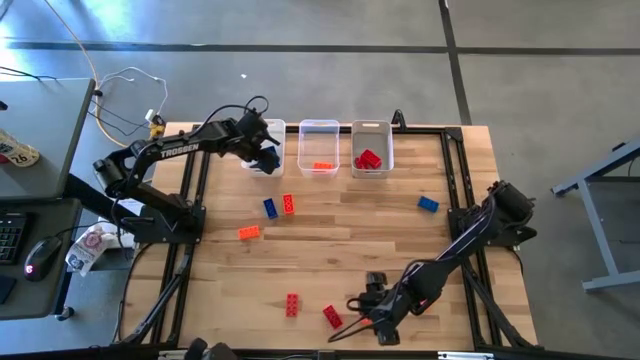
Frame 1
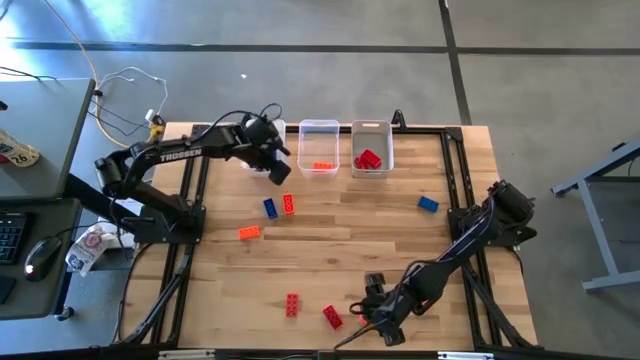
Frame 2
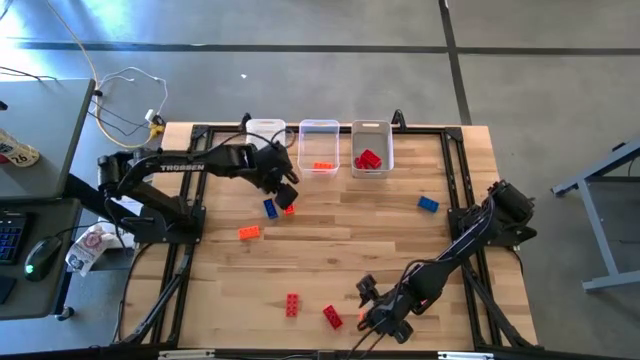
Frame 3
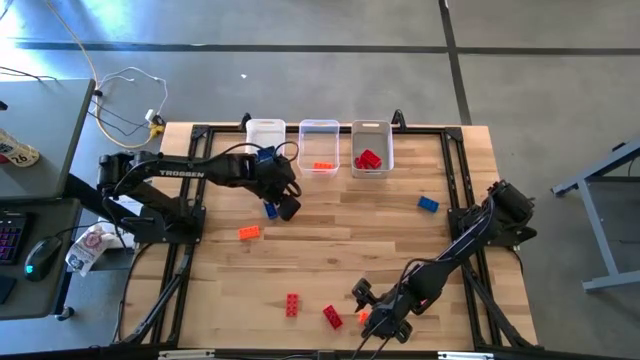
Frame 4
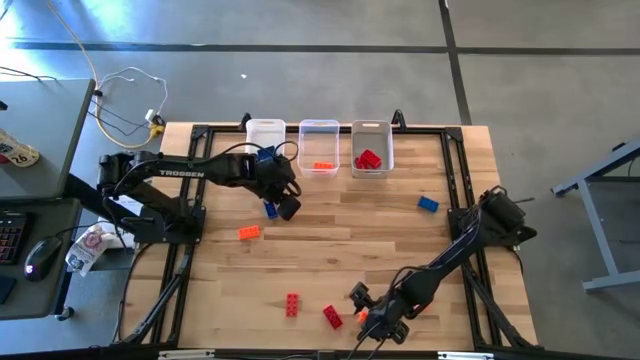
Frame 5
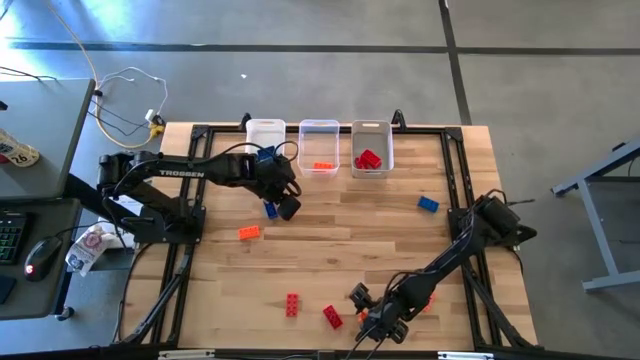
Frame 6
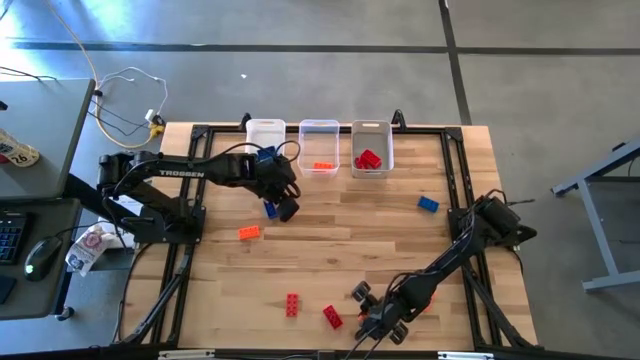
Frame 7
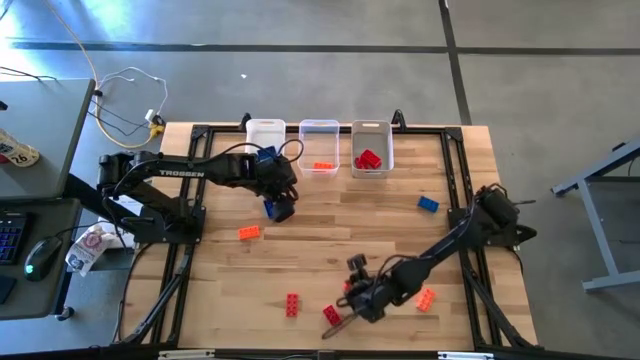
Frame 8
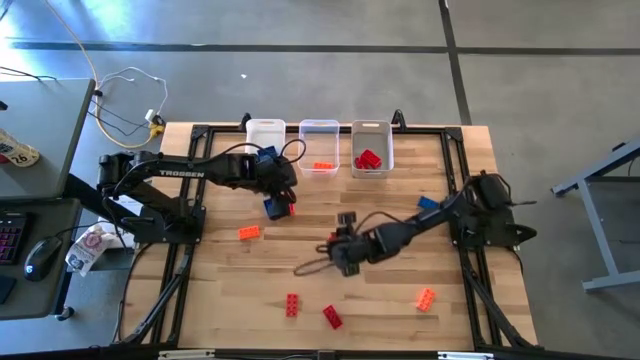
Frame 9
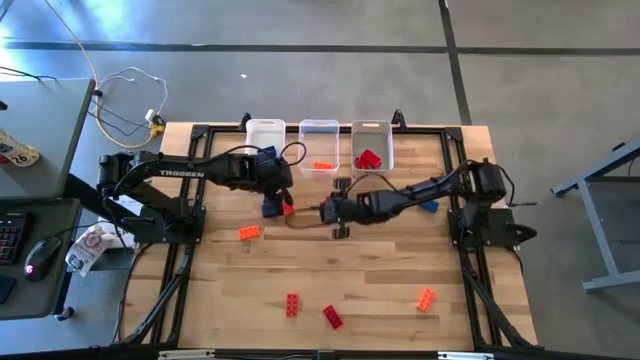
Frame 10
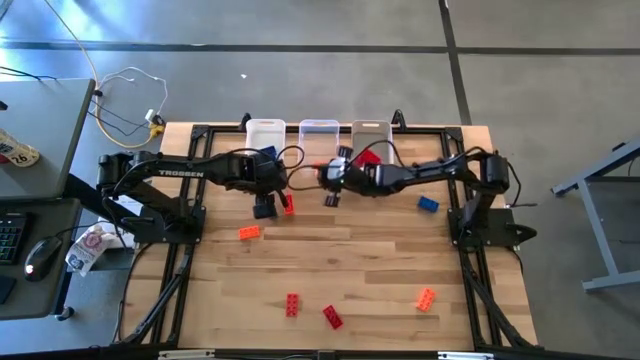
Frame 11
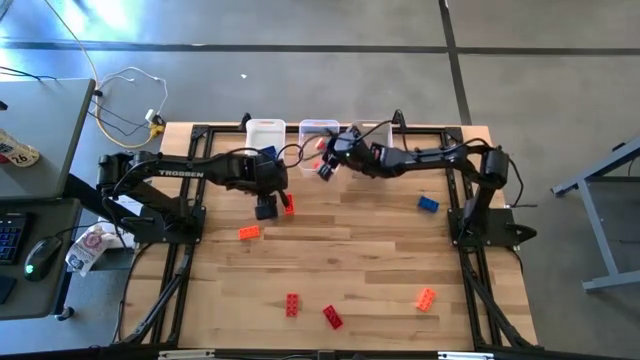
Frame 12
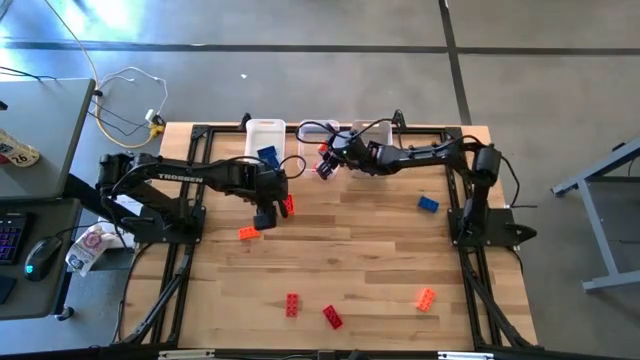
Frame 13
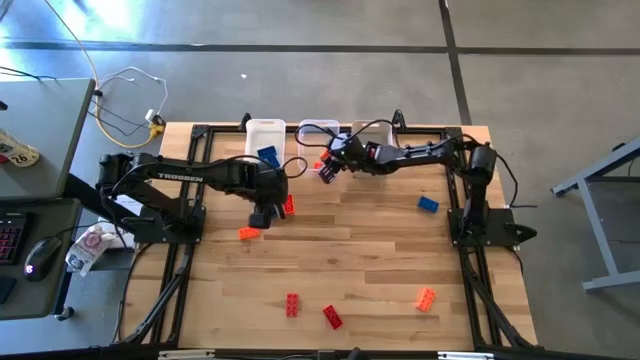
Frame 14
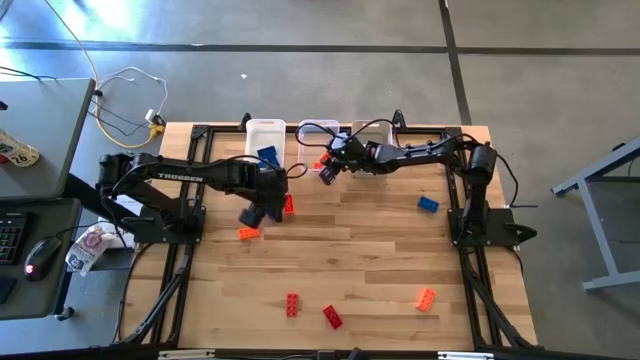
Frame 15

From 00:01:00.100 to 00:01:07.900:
Task: Sort & place blocks by color
Put the orange game piece into the transparent bin

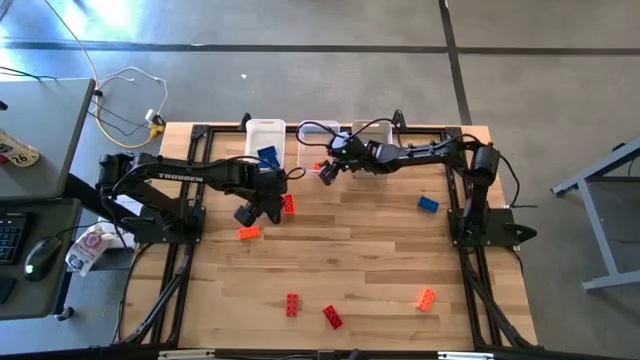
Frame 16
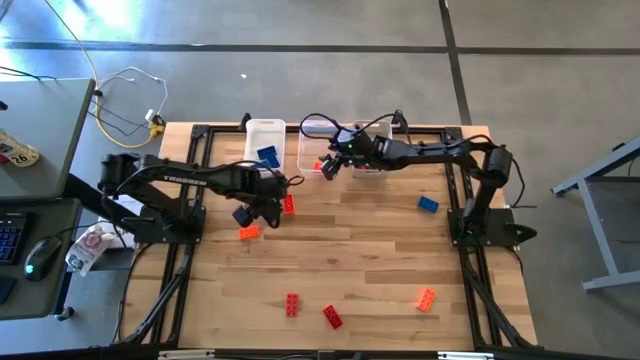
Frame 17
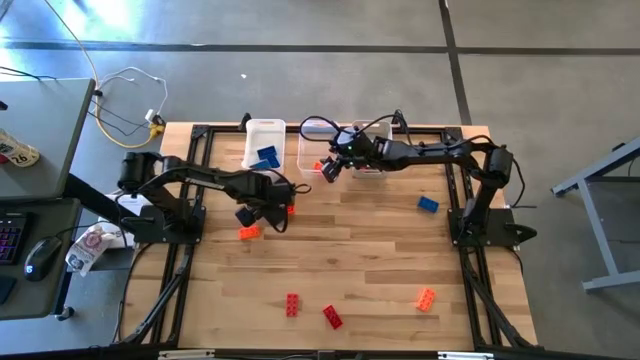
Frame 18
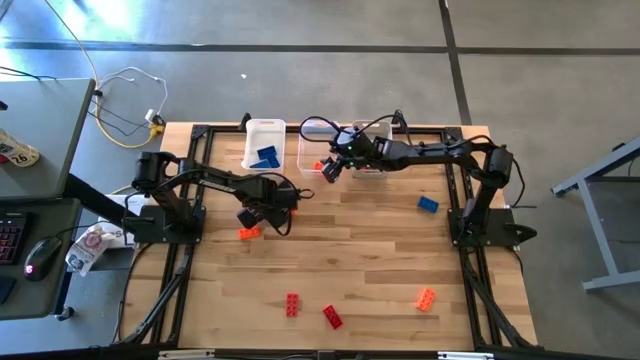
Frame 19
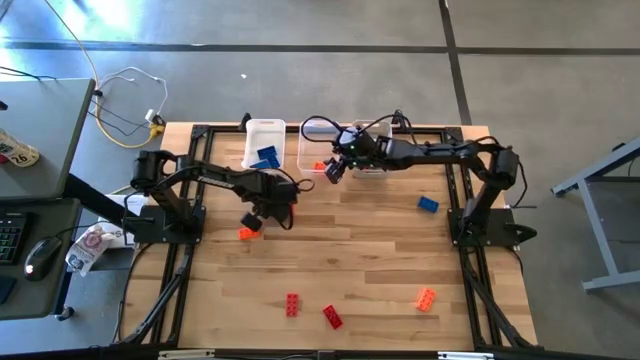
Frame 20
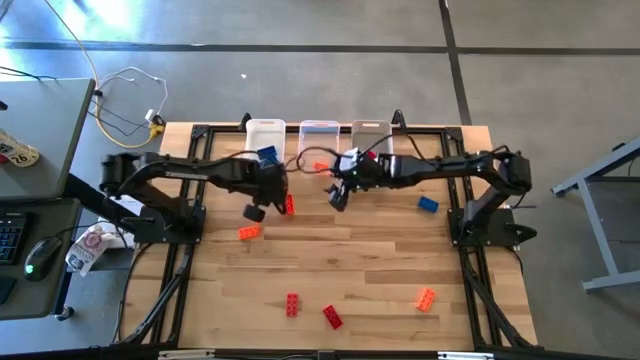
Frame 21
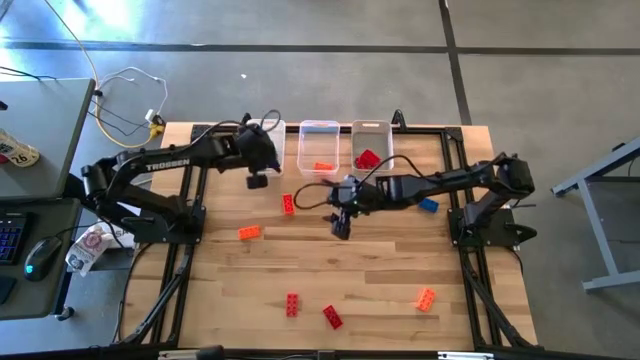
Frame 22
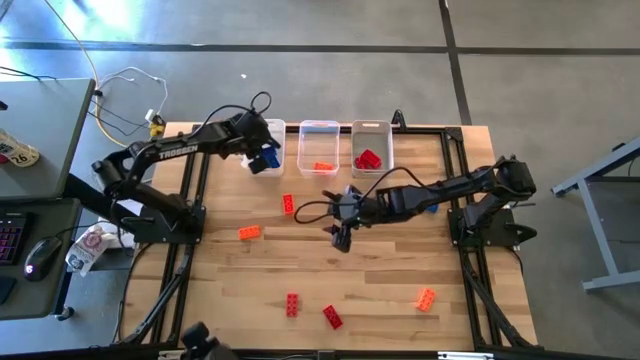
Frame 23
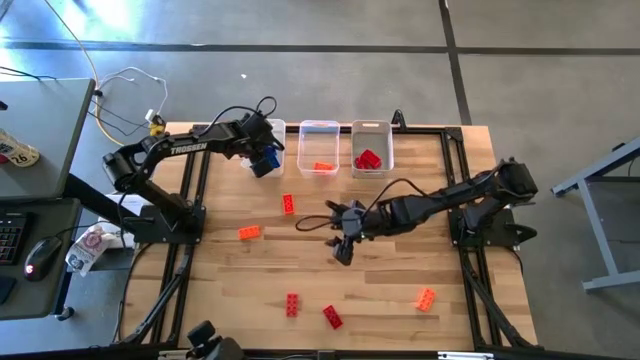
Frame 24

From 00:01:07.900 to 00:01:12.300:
Put the blue game piece into the white bin

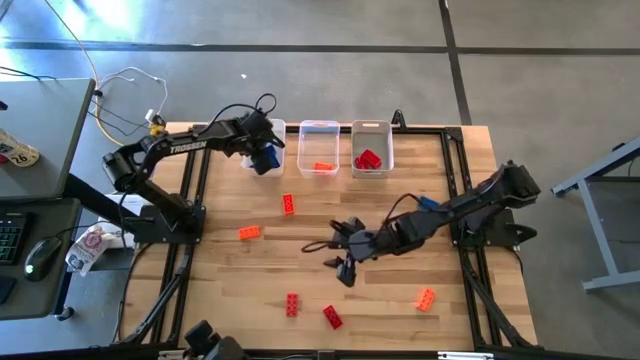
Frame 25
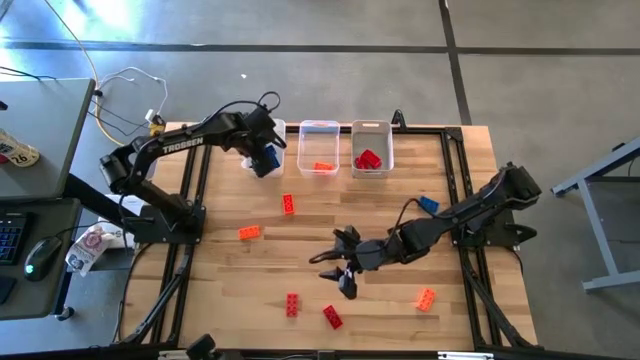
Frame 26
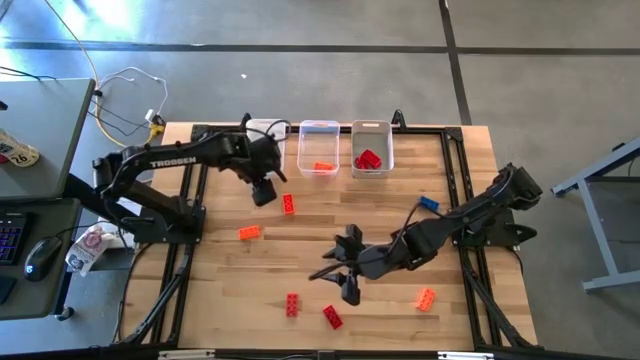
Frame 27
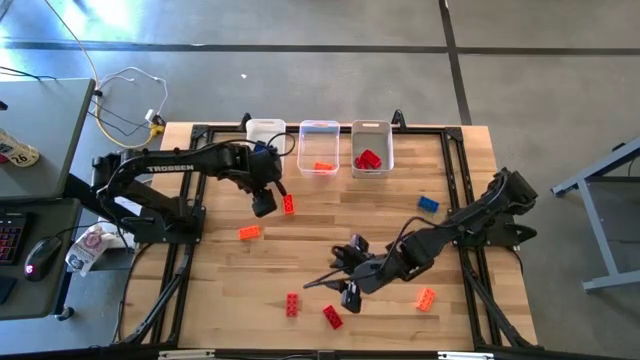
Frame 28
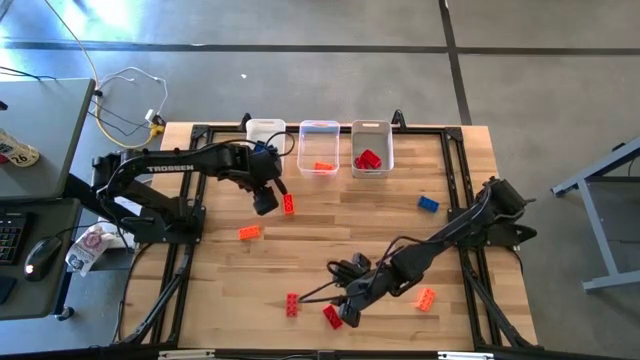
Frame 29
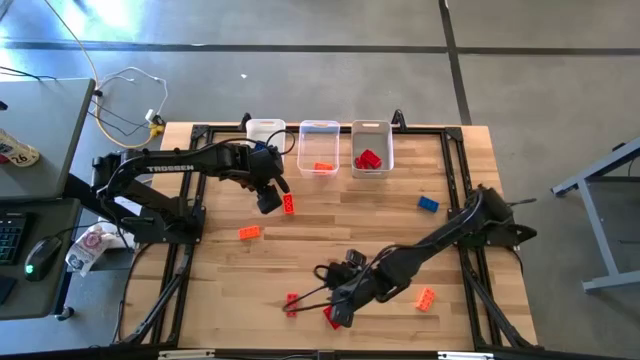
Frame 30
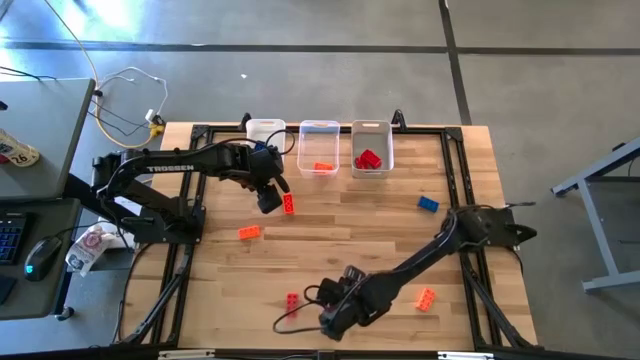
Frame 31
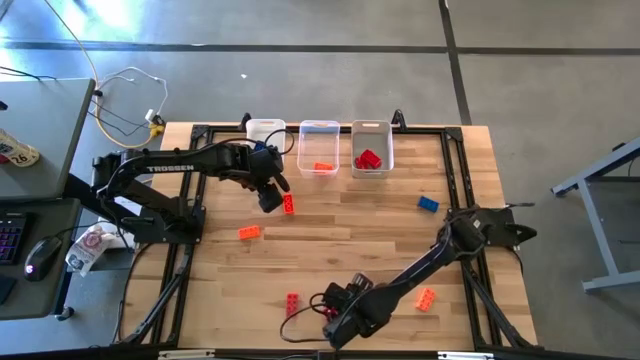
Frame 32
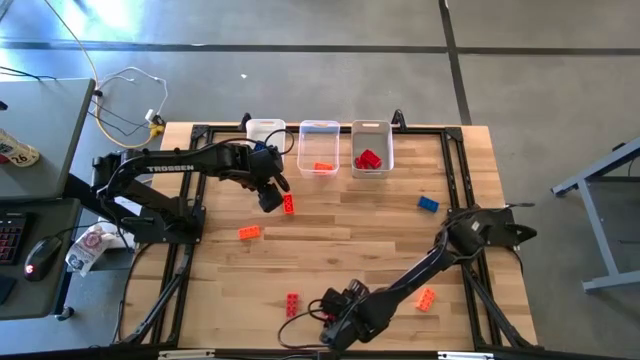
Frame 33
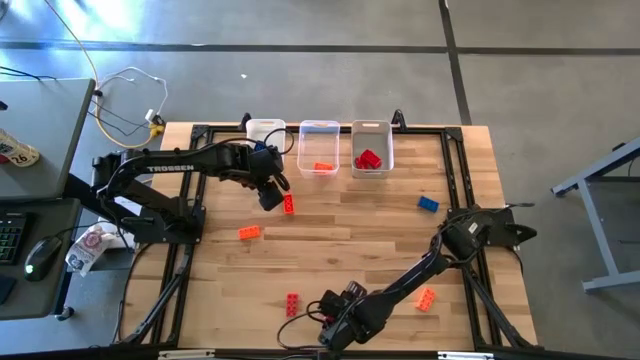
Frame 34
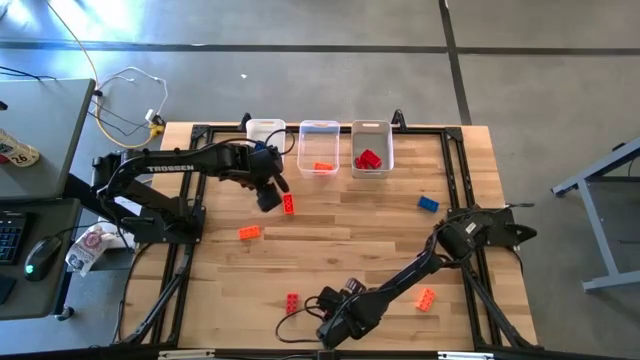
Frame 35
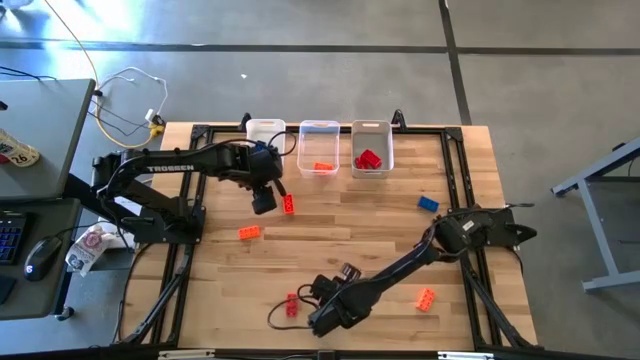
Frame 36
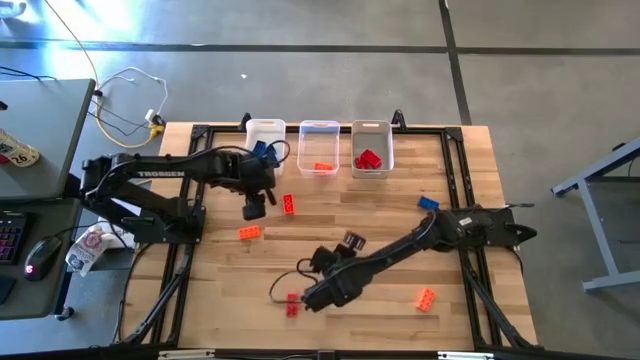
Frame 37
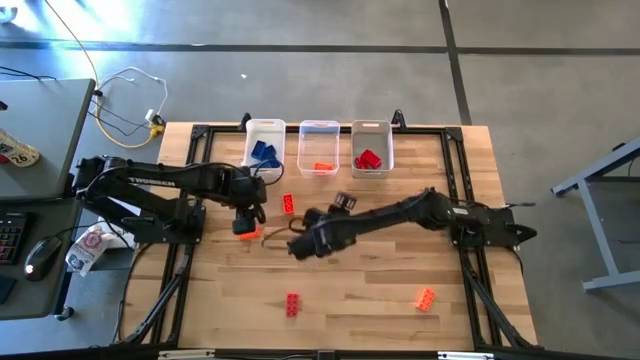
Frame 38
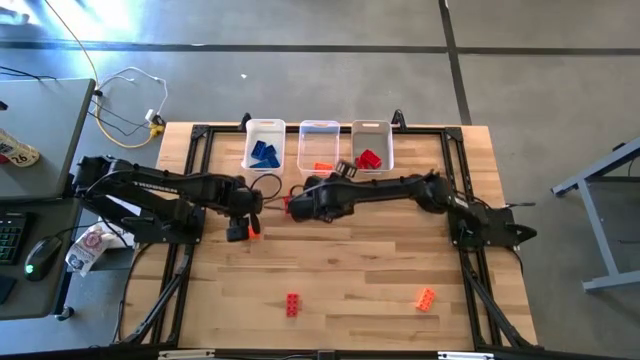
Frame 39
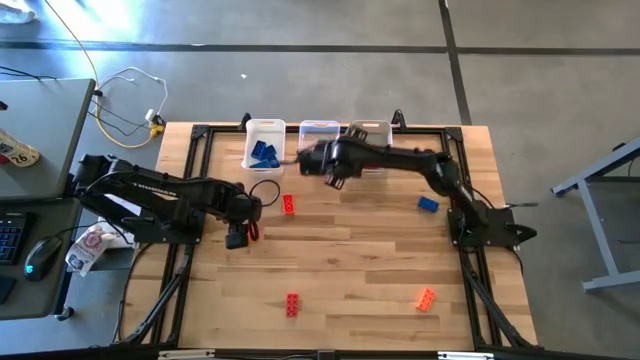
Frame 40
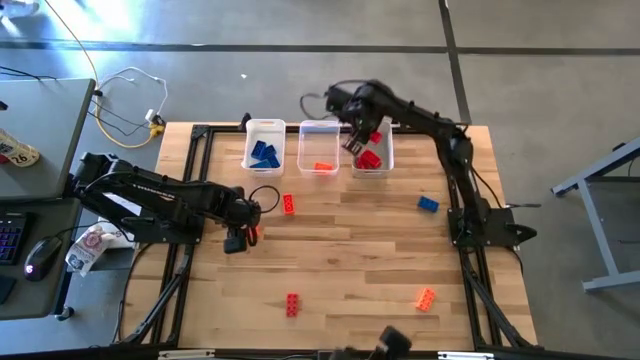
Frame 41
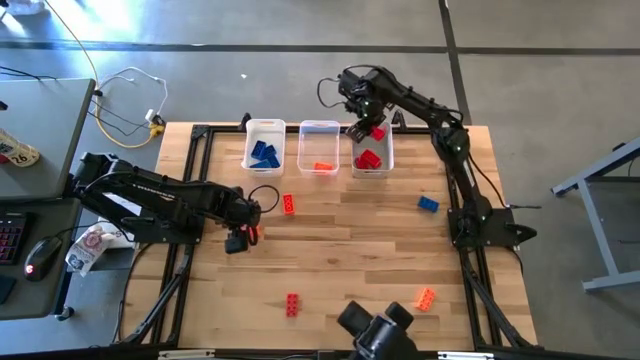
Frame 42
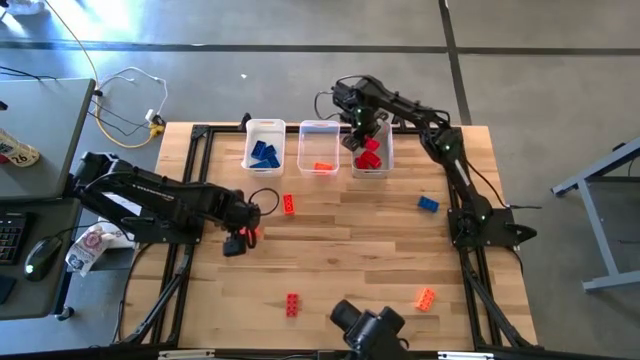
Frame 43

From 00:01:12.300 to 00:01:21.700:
Put the red game piece into the gray bin

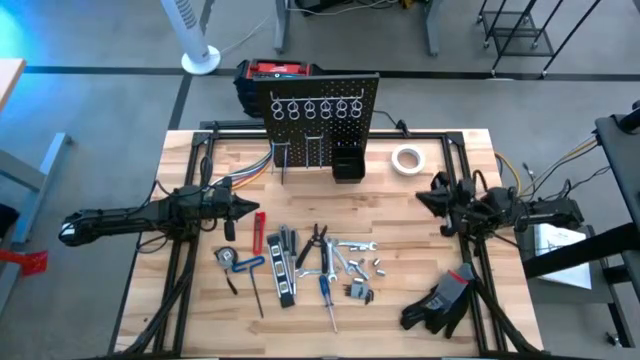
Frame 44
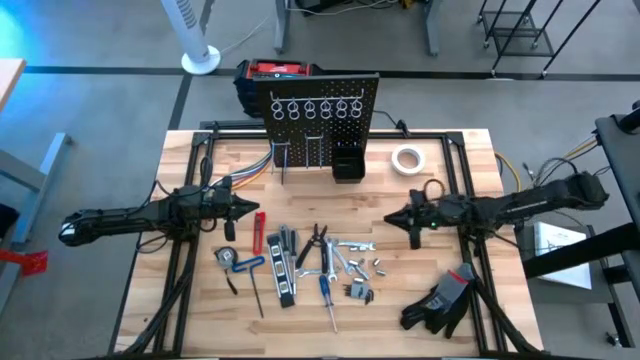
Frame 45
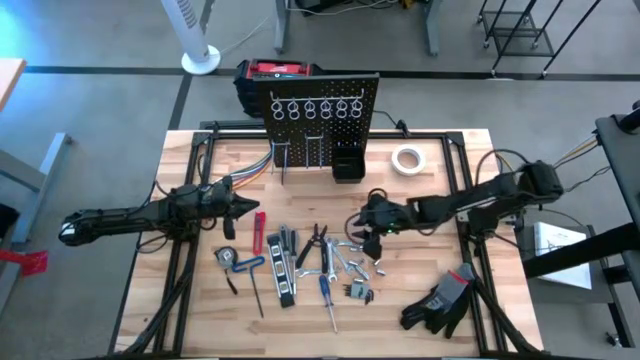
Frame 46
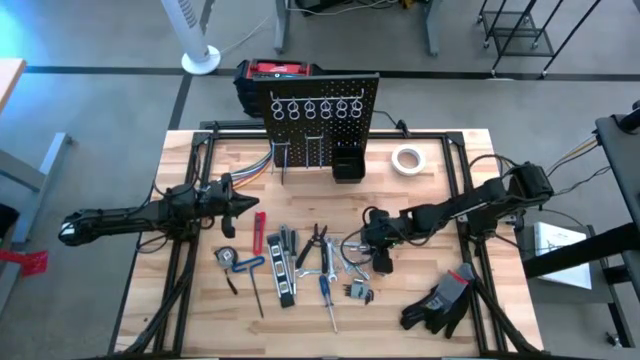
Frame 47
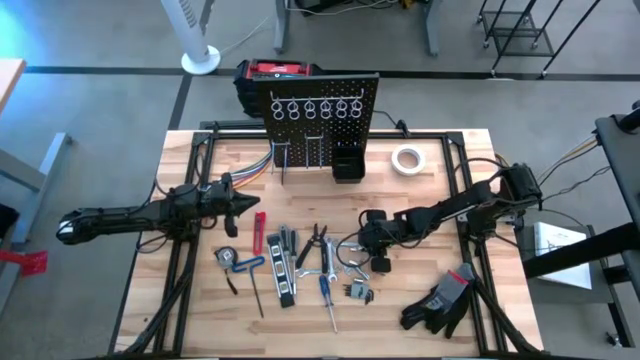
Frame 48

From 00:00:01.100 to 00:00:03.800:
Task: Hang tools onto peg board
Put the socket into the black tool bin on the peg board
